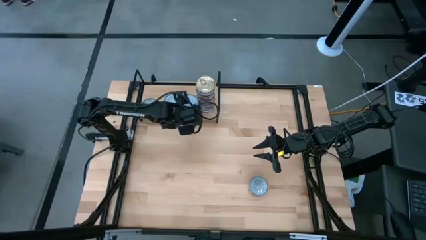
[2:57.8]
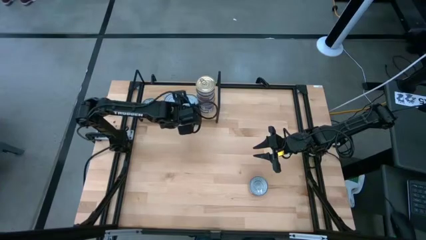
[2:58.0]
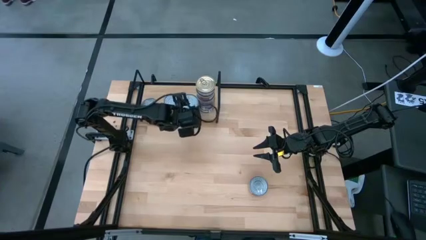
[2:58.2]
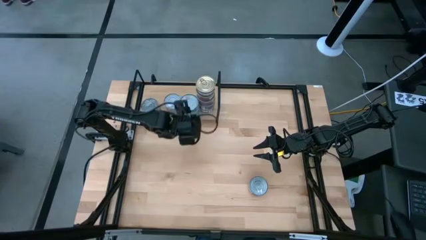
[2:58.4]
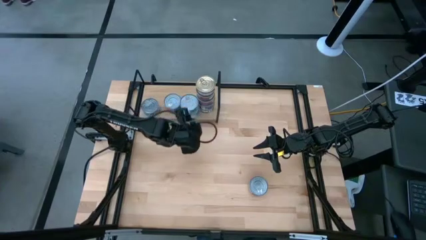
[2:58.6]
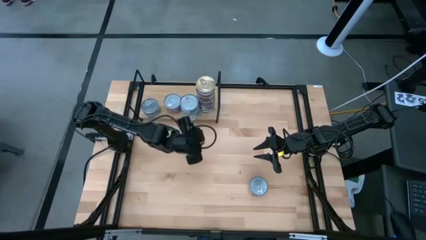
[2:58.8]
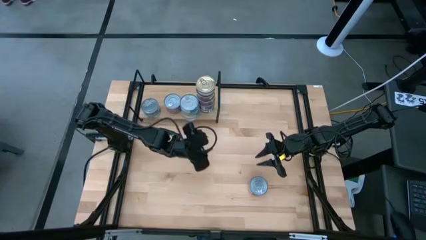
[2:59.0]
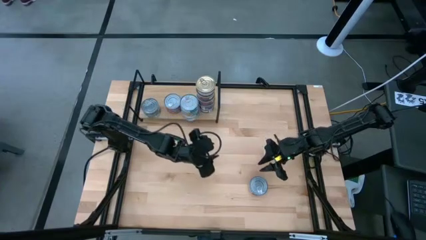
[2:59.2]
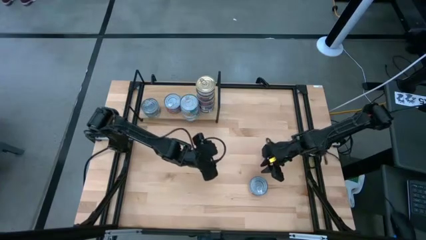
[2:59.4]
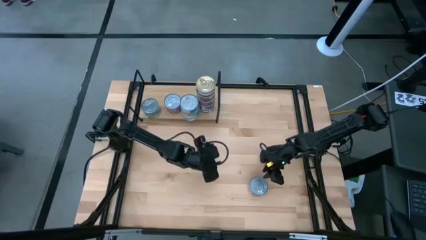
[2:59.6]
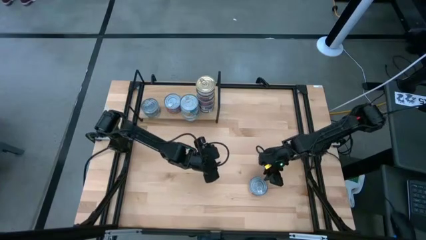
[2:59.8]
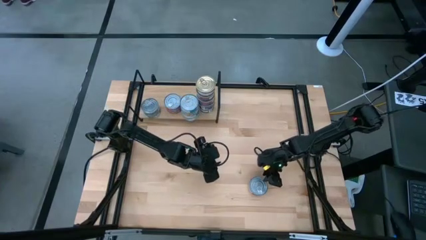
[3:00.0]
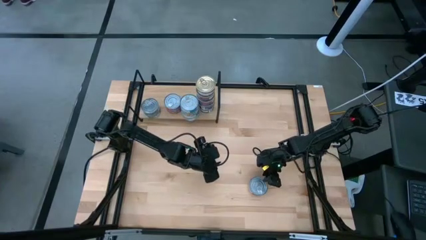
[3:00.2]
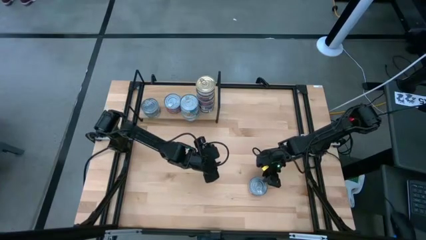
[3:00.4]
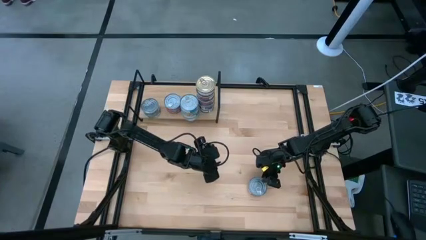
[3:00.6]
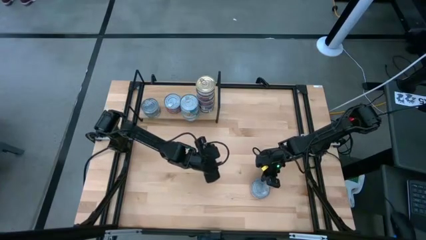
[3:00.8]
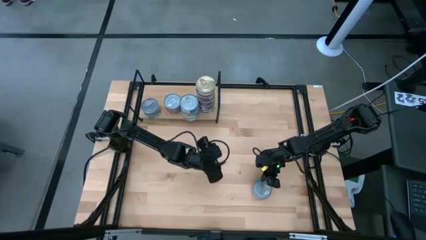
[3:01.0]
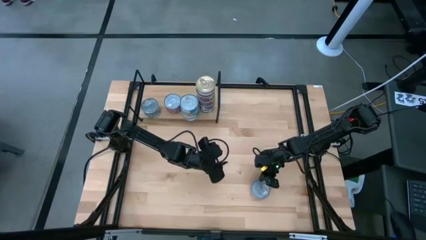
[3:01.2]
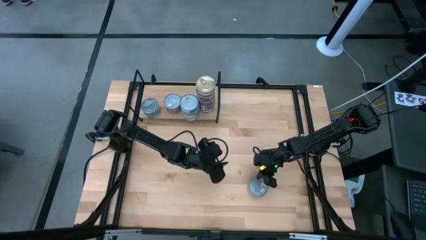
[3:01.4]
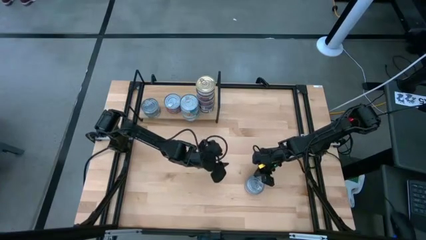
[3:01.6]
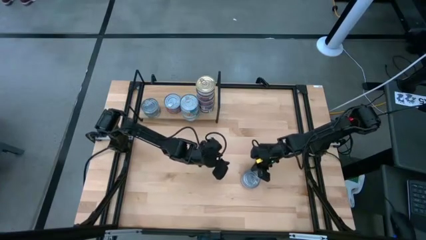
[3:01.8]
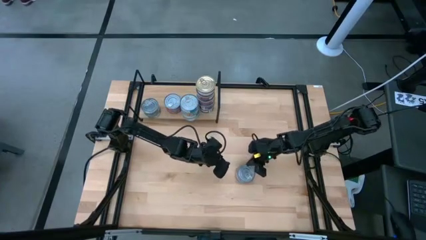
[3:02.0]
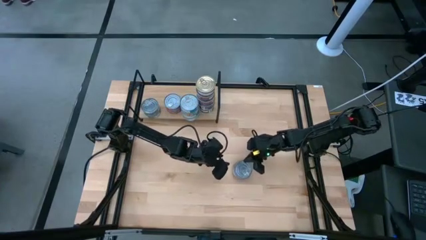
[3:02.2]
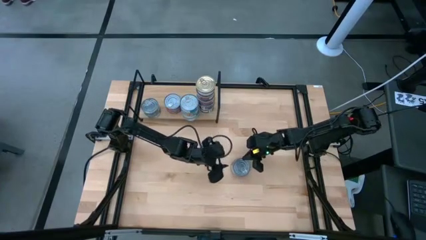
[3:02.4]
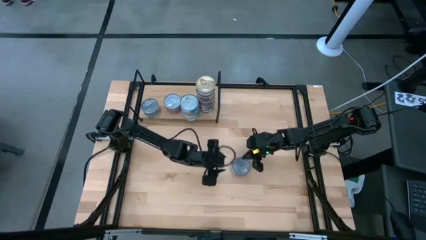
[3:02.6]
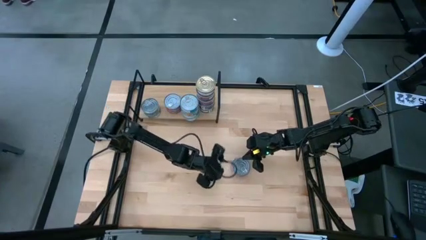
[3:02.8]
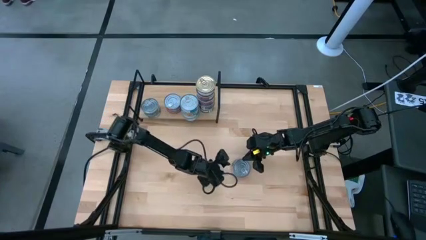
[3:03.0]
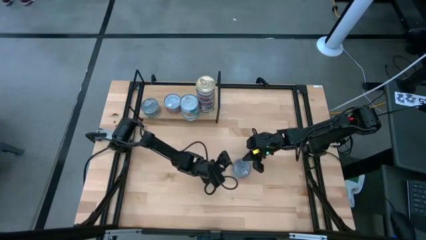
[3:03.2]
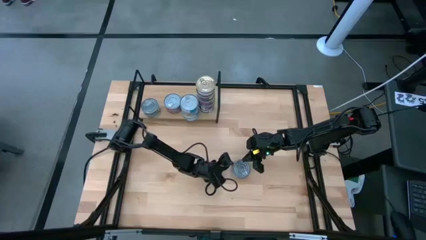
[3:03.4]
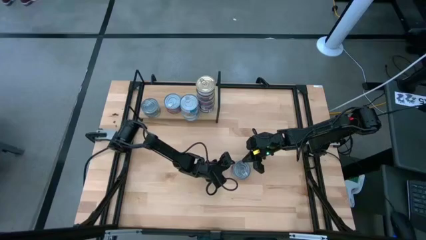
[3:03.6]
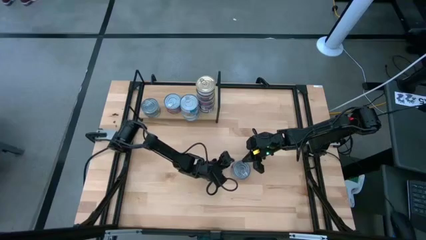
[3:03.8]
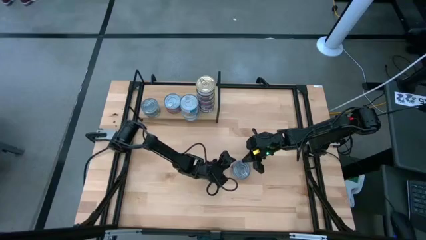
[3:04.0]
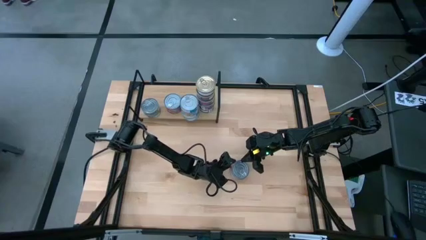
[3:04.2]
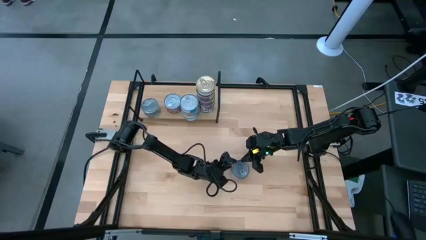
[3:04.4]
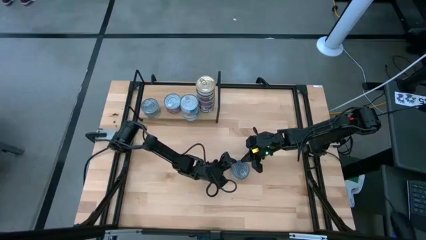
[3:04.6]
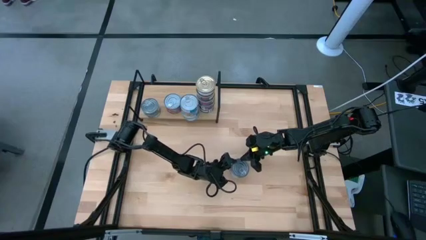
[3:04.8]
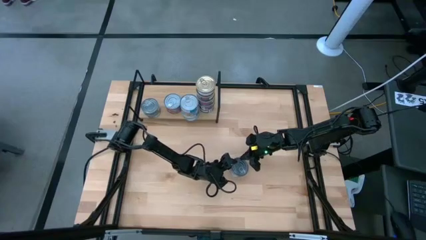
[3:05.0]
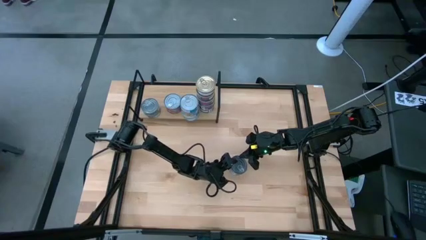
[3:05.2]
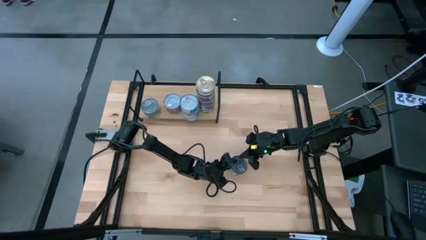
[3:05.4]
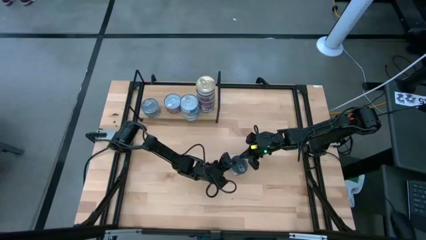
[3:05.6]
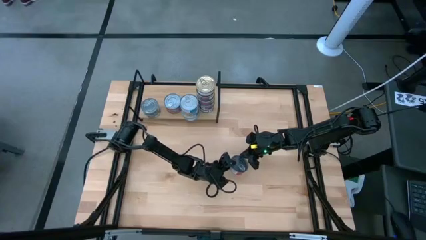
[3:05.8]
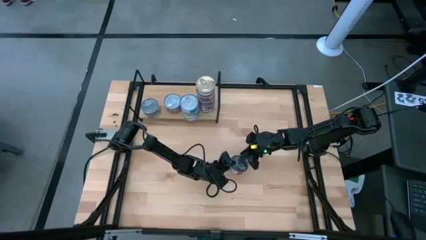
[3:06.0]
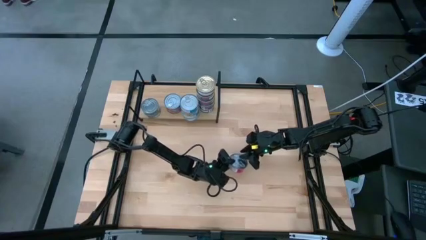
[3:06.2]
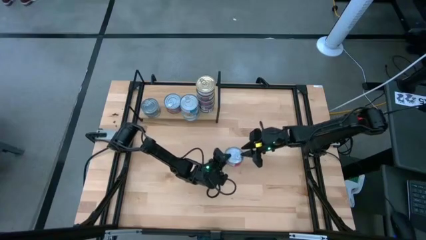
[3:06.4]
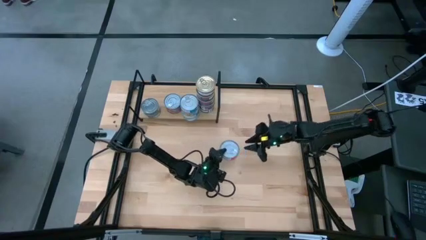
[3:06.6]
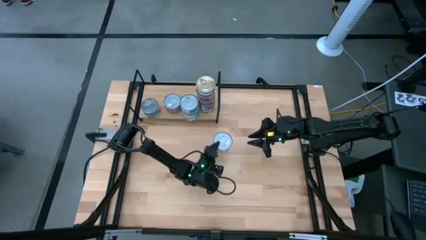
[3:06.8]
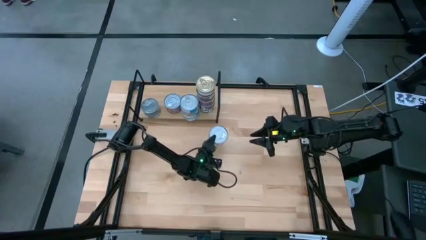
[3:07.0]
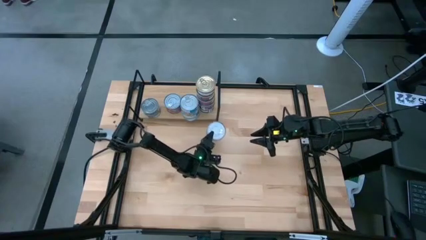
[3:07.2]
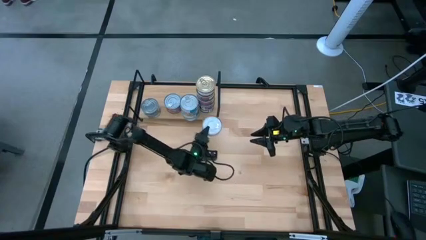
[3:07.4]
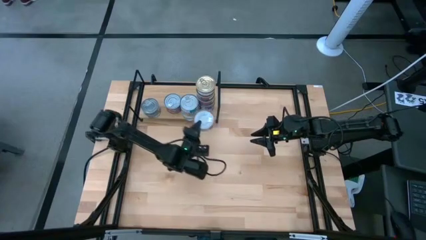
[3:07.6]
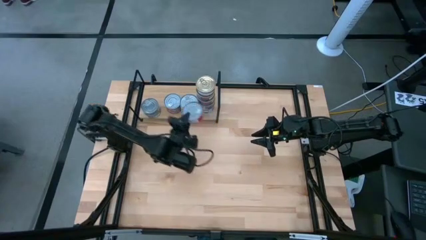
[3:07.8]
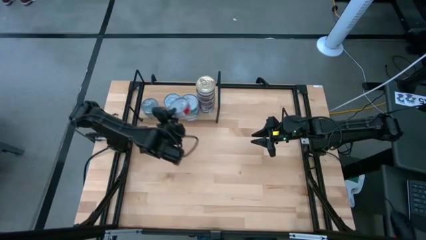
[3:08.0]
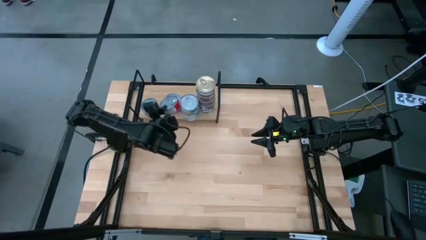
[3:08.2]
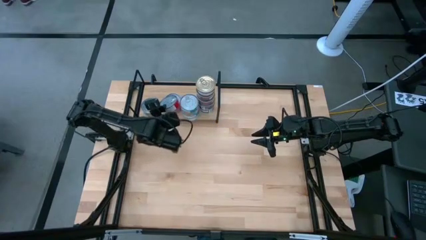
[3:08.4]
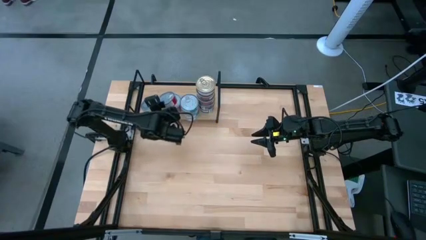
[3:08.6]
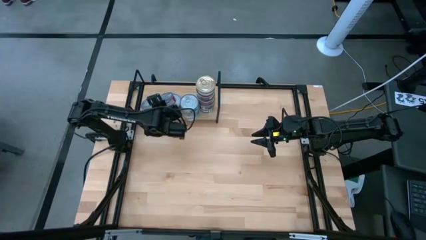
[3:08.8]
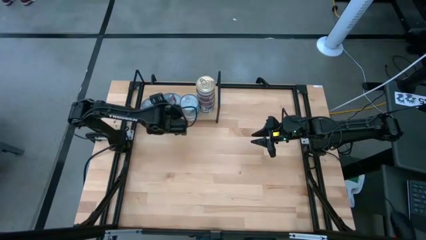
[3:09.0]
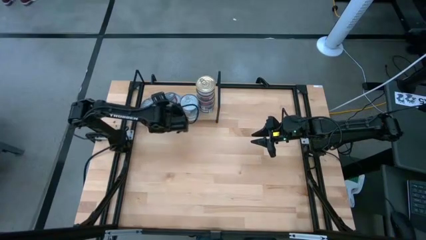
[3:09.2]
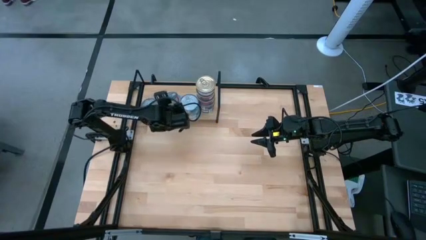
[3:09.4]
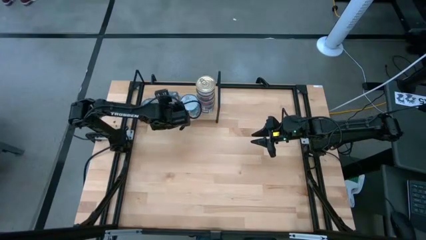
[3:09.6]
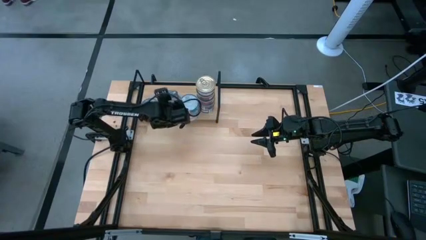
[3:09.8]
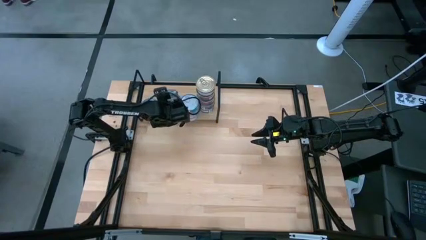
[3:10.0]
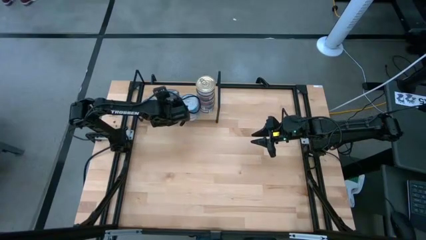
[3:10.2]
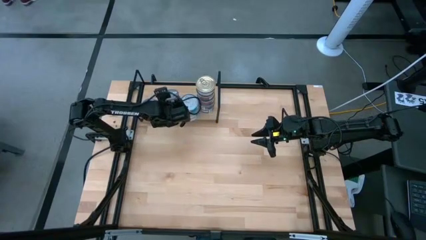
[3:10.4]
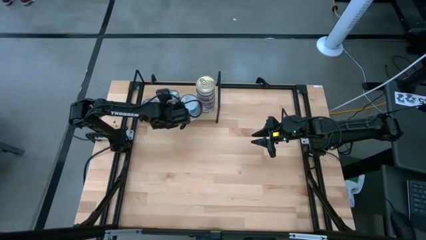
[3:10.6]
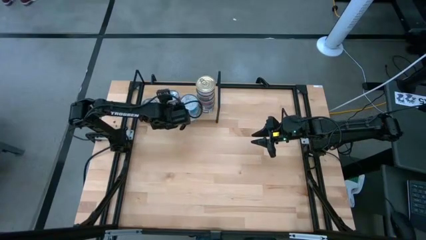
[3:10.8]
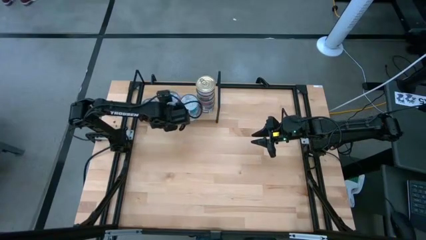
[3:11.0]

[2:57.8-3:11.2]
Task: Stack canned seafood by type on shelf
Stack the red tuna can on top of the red tuna can on the shelf
